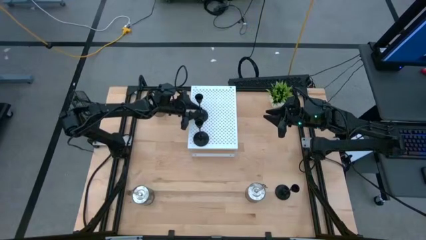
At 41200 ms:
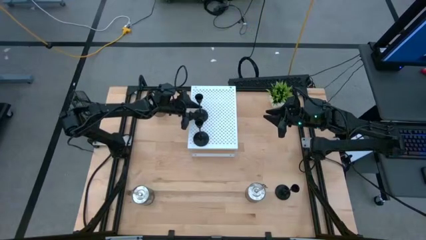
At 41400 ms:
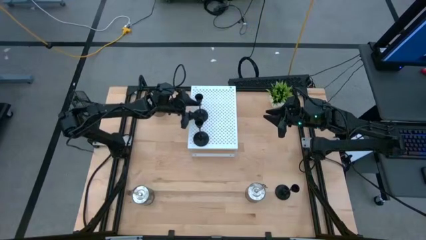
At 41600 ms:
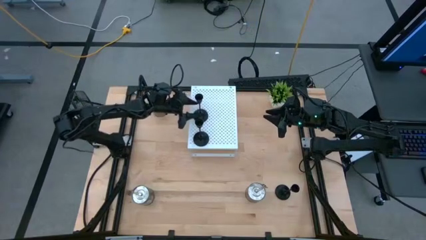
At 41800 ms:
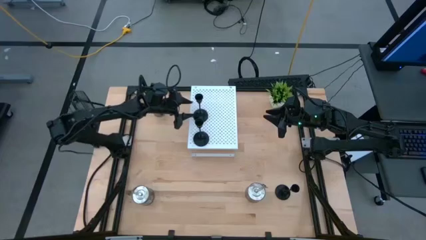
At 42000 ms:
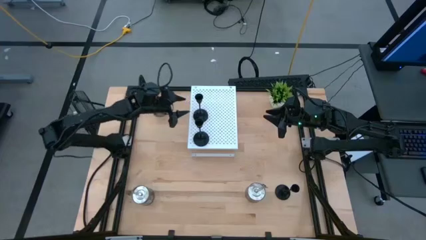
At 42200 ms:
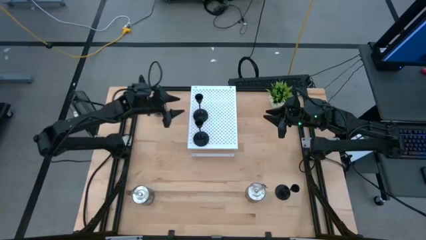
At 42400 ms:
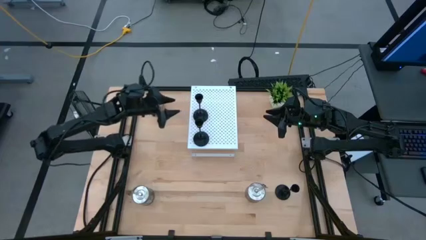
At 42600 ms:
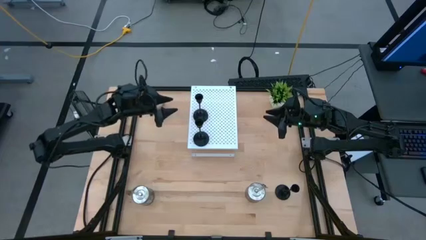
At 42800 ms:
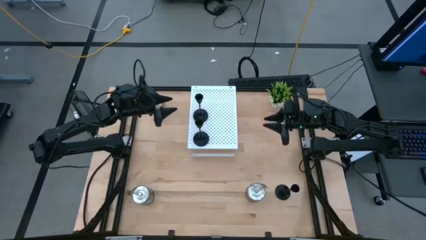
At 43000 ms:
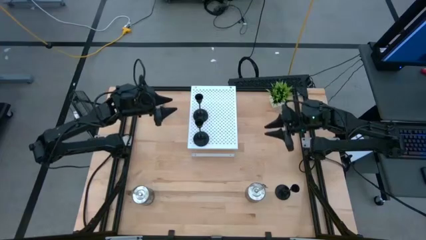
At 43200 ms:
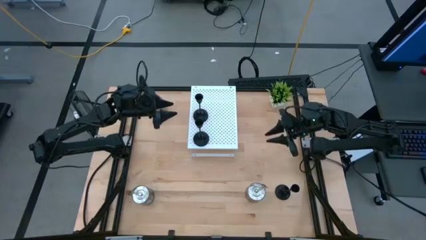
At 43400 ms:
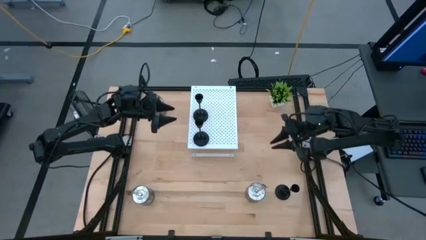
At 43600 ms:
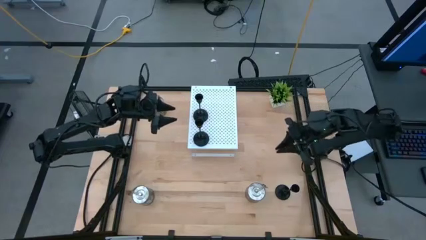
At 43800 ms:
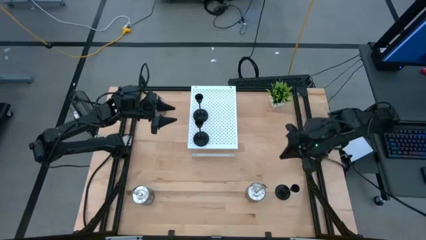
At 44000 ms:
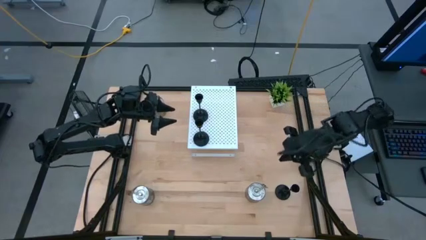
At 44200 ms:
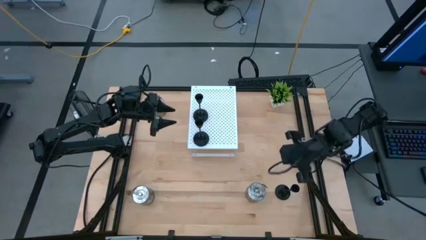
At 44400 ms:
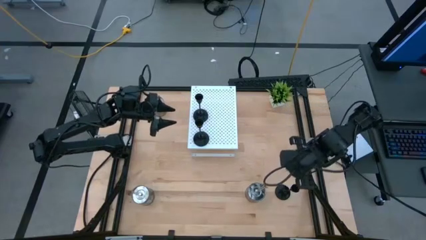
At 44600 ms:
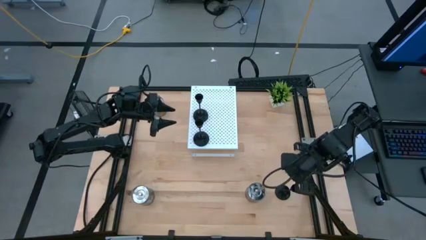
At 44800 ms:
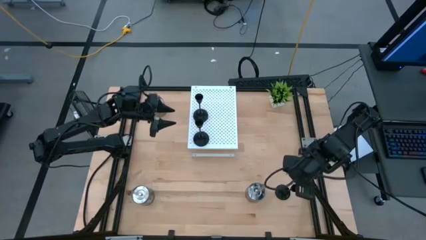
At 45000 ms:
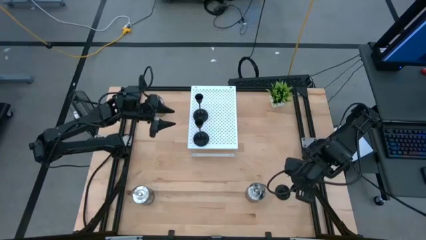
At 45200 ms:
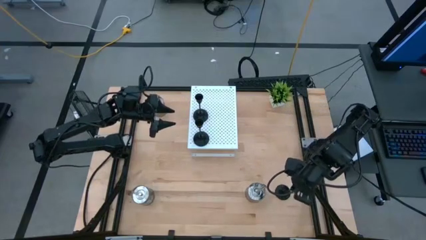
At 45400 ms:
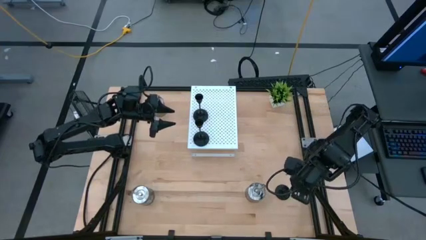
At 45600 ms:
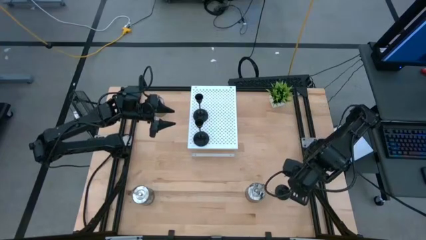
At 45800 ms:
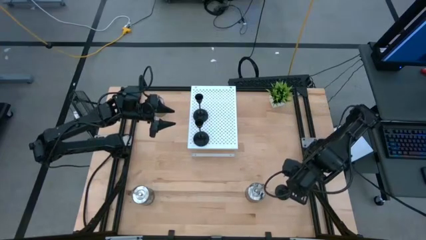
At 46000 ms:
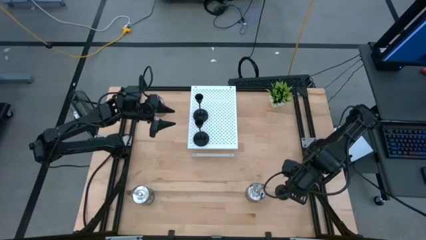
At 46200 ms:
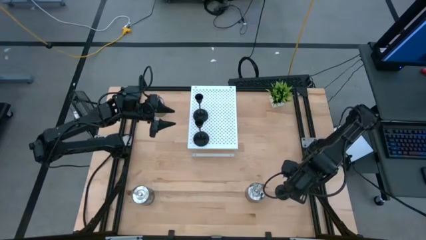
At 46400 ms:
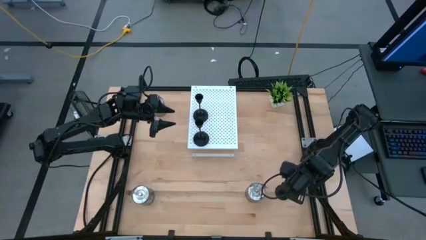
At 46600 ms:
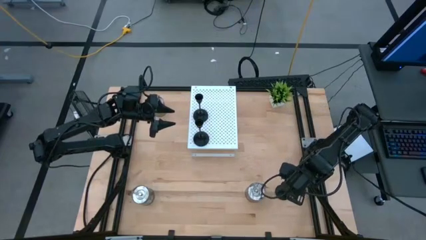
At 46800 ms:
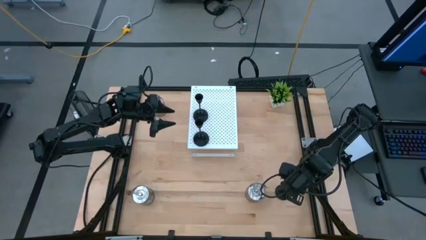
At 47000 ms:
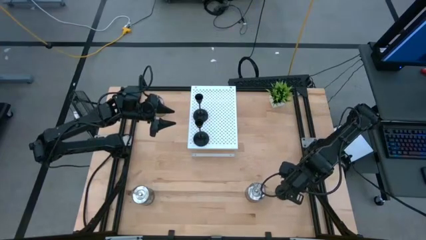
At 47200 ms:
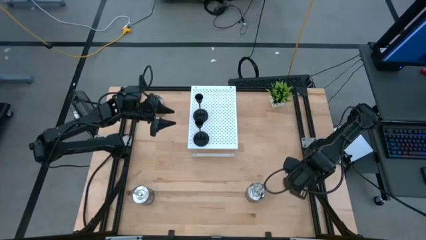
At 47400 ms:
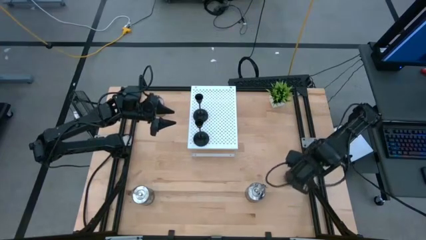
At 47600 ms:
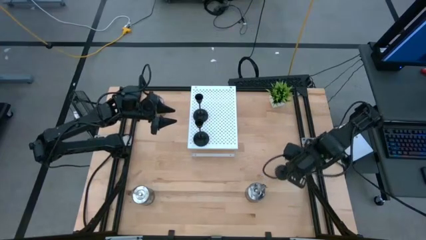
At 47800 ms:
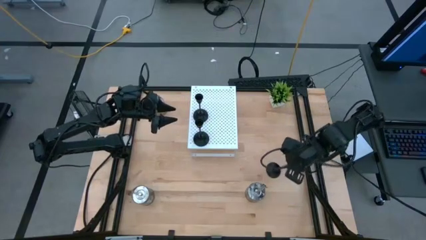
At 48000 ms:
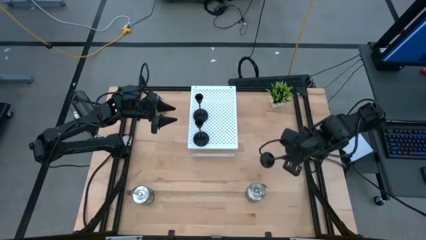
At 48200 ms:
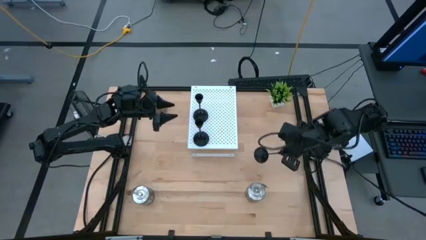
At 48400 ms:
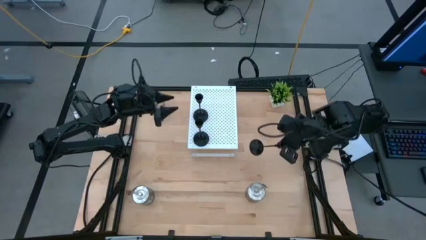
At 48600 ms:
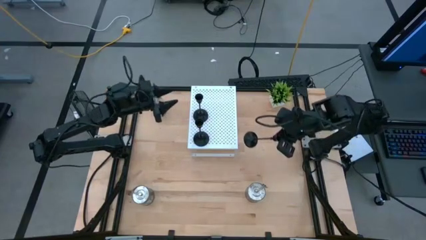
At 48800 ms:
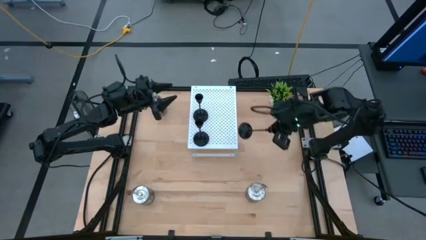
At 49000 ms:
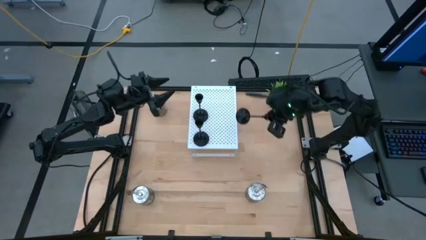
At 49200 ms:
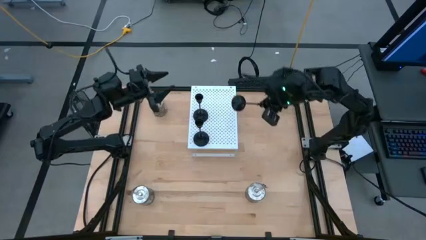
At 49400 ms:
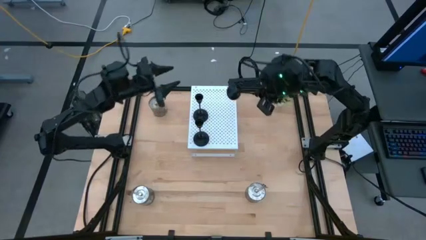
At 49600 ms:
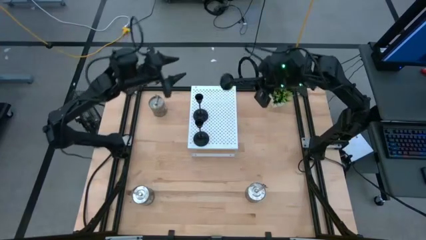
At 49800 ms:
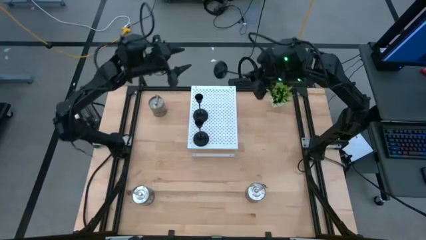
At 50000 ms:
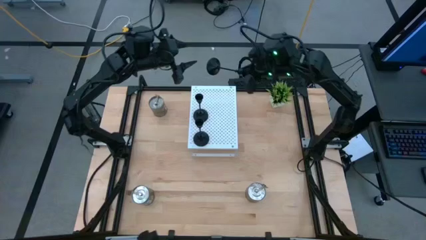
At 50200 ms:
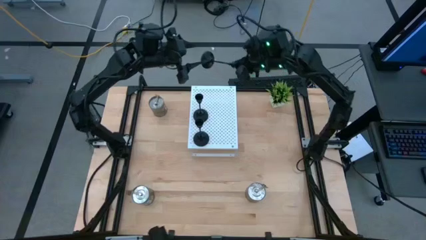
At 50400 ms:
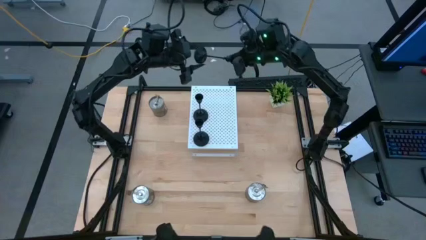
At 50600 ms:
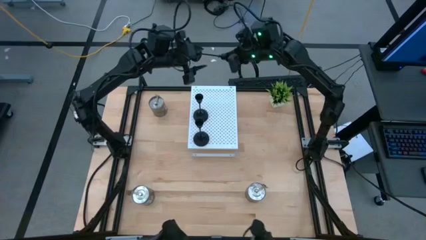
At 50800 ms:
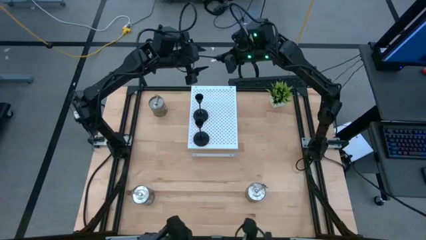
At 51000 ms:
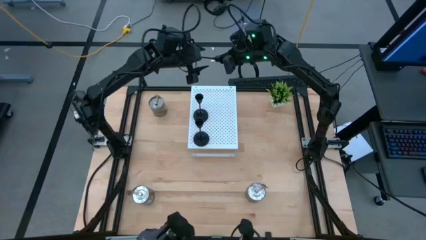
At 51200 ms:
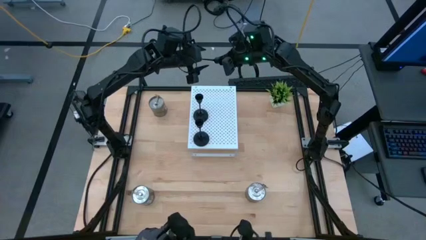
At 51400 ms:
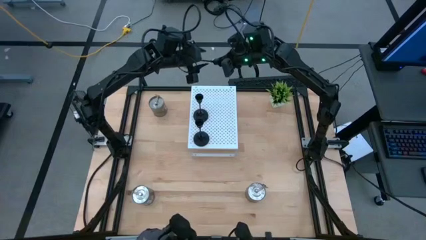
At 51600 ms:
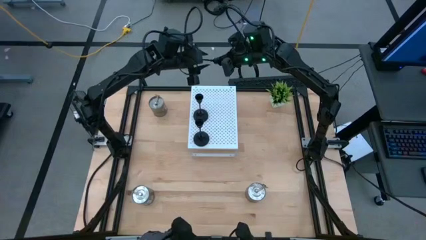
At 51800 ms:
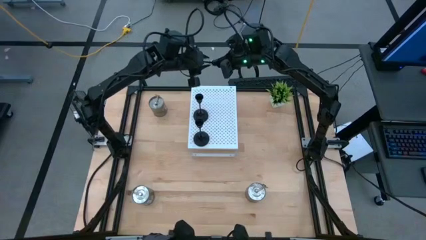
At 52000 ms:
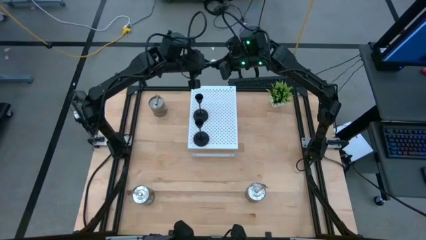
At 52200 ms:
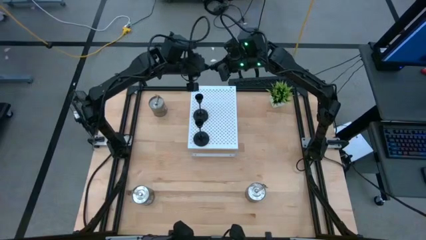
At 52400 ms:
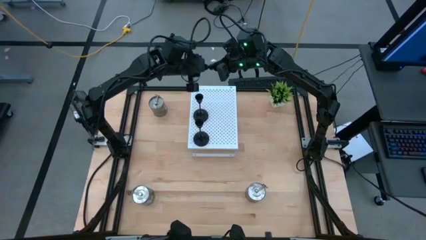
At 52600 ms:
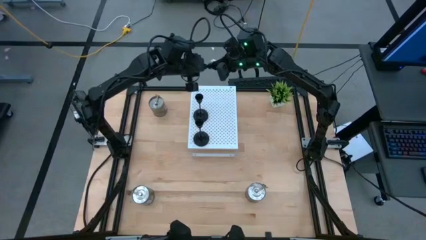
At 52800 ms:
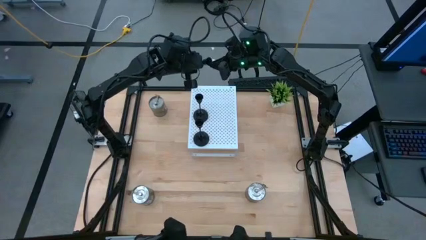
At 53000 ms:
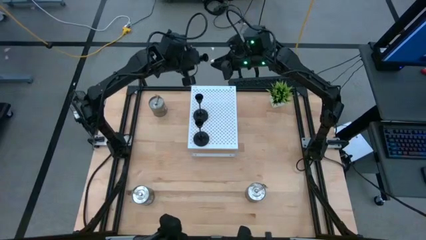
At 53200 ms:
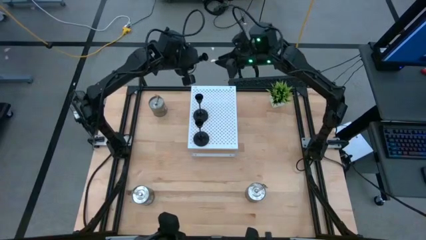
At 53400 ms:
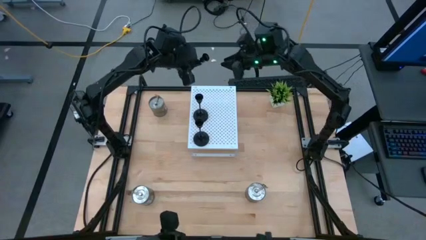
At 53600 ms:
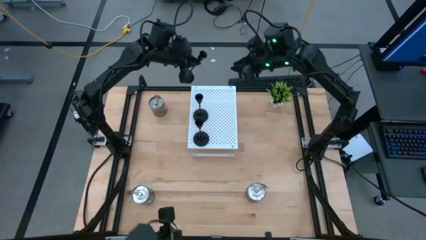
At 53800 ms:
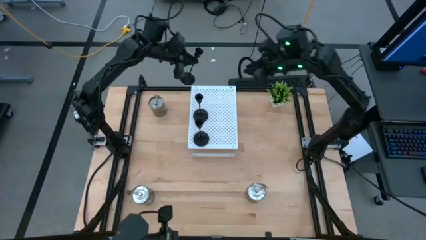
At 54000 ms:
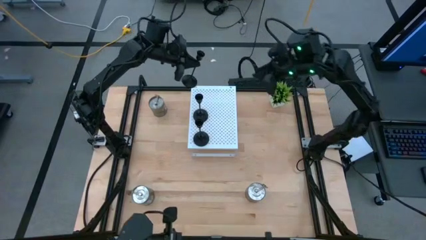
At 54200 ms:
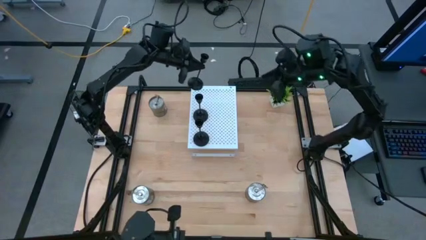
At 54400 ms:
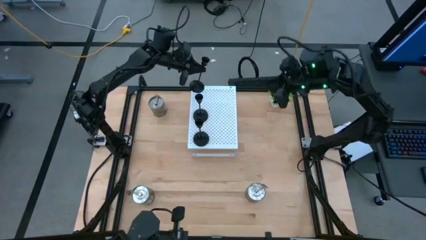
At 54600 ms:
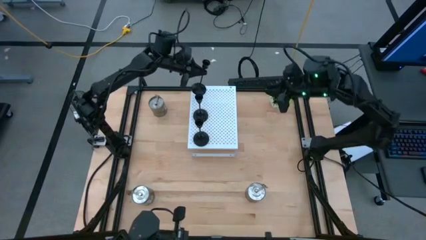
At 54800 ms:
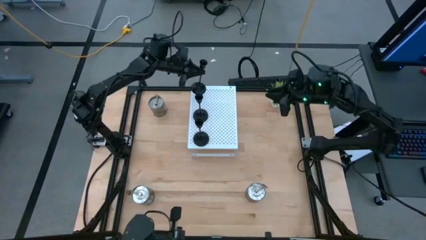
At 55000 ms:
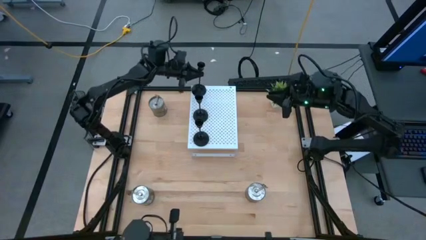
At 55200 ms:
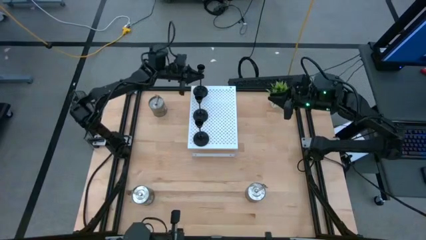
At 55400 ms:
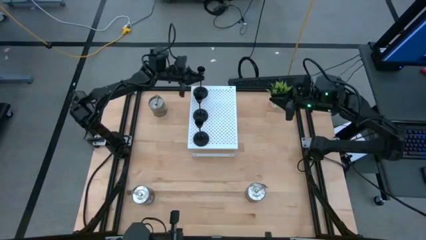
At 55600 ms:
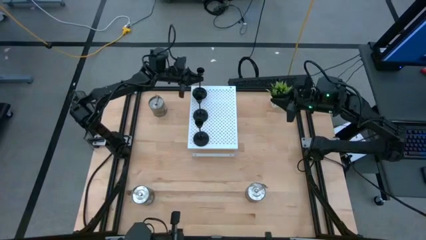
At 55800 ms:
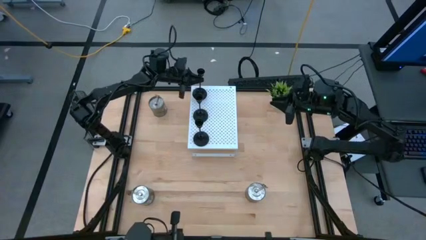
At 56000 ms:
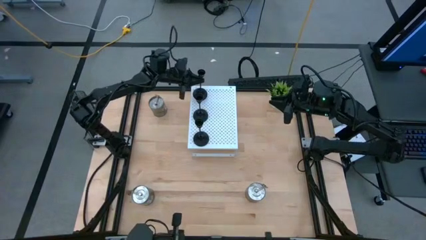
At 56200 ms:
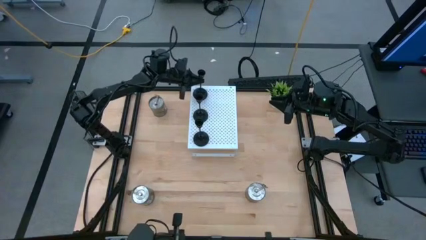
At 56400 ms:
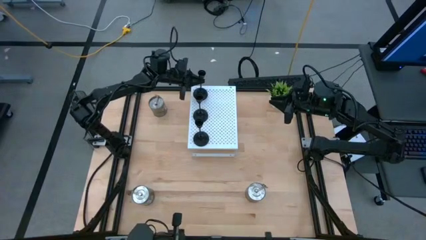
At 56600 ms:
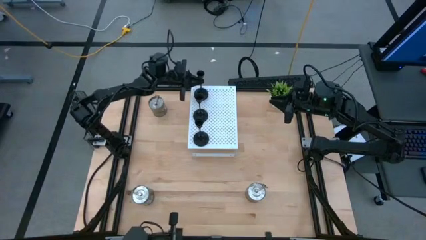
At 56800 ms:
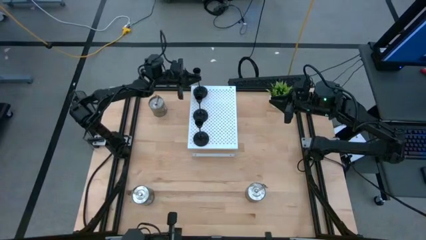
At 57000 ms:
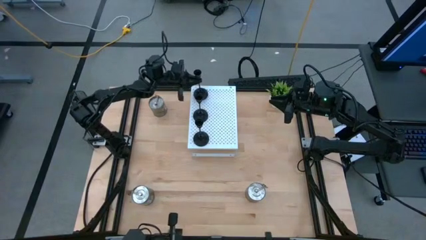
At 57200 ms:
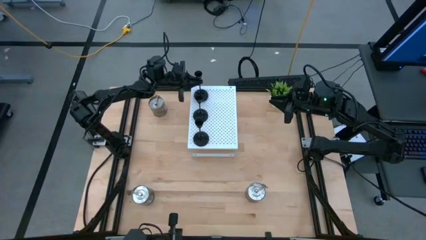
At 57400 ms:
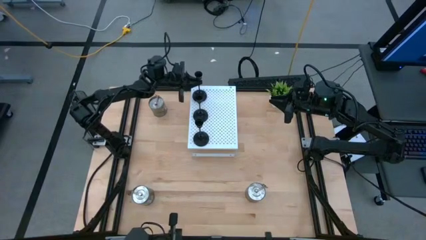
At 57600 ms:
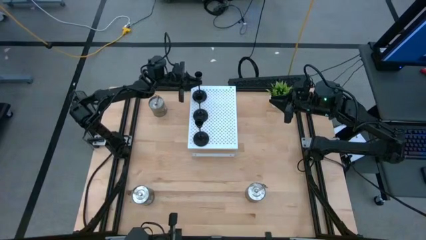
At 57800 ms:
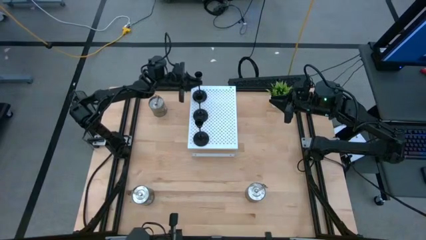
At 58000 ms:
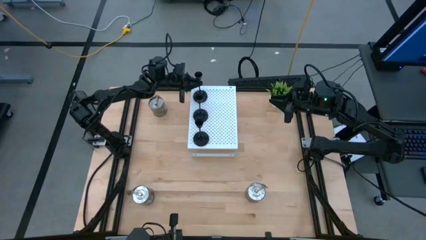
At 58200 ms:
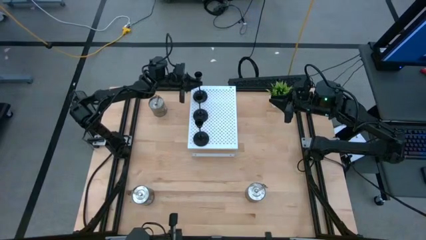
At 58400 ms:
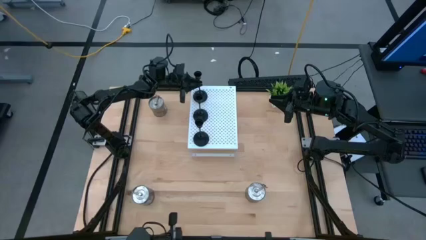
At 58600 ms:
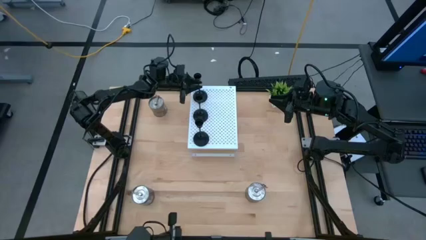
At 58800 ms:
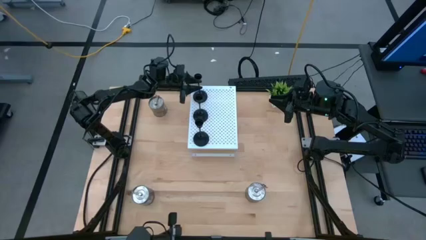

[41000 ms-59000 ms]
Task: Pick & Place candle stick holders
Put the black candle holder on the shelf aligned with the other black candle holder
